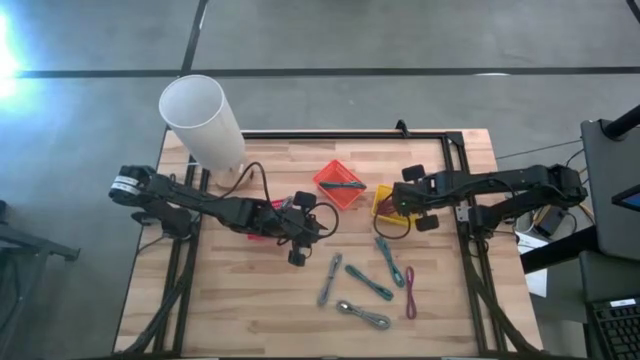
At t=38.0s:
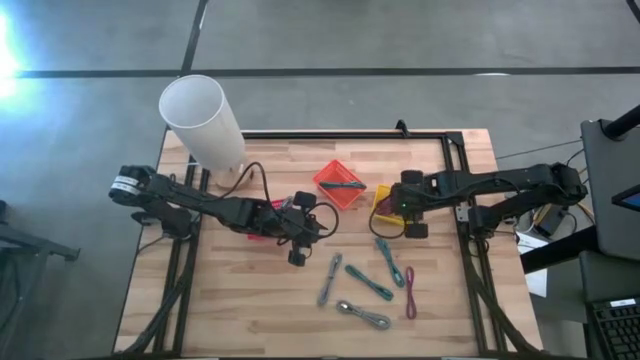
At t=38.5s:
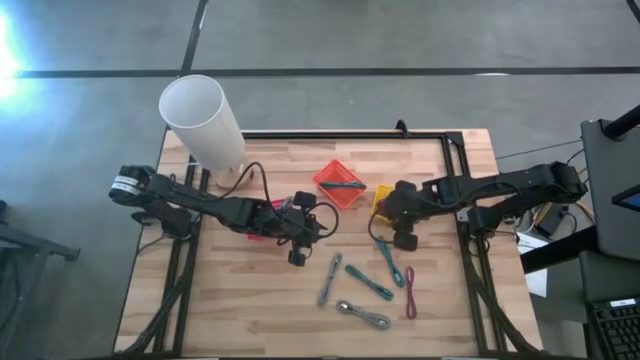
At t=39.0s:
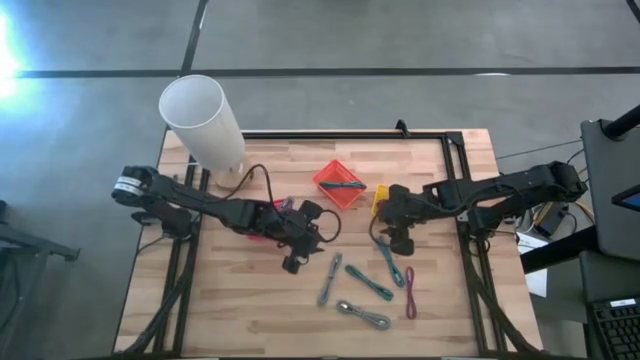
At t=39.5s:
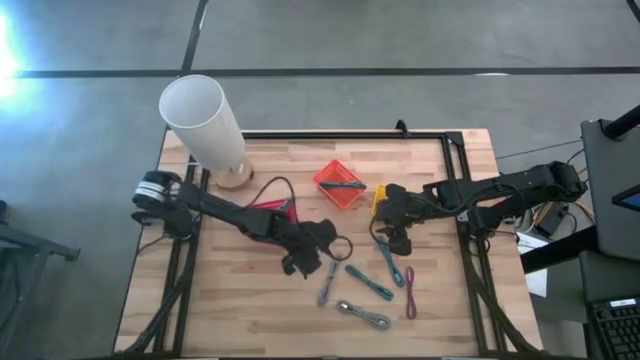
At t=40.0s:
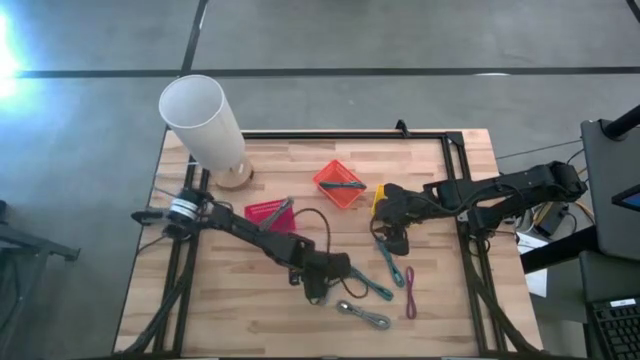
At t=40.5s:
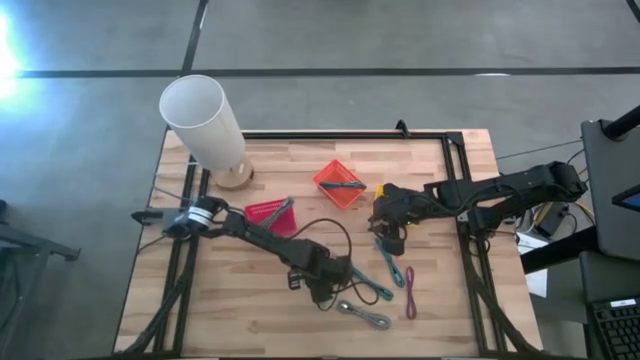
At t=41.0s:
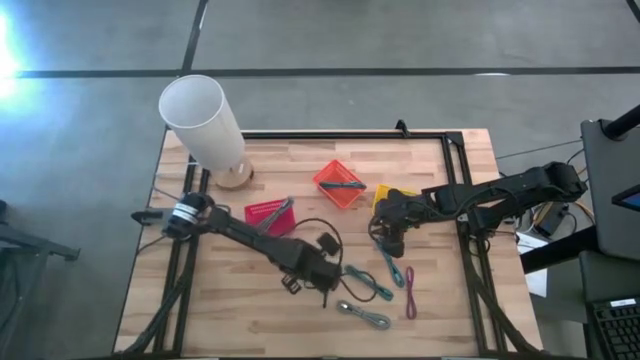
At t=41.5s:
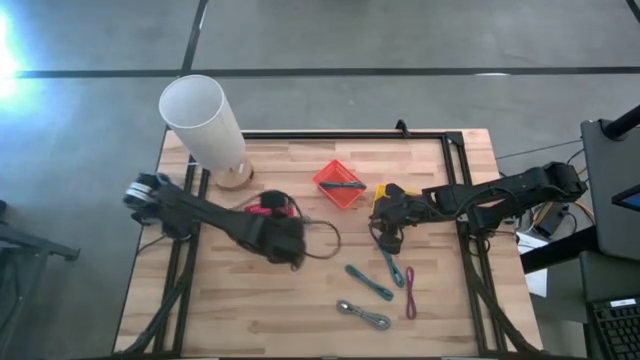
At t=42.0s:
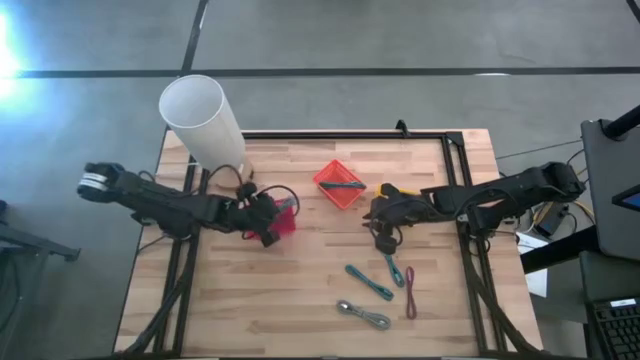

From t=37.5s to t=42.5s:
Task: Pick & Place USB Port
Put the top black and white charger cable into the red bin

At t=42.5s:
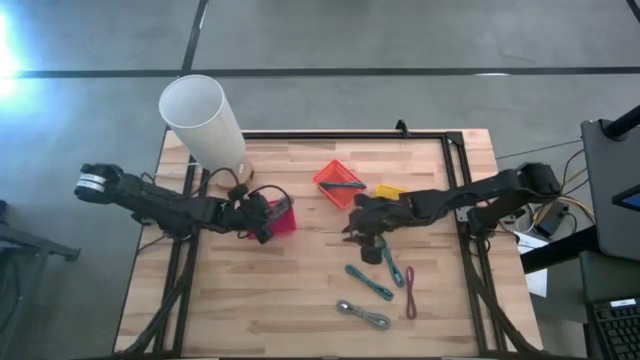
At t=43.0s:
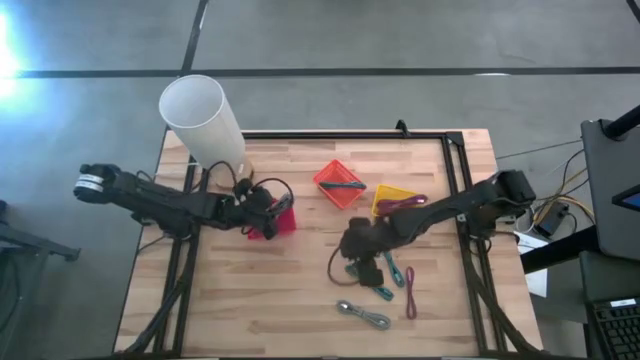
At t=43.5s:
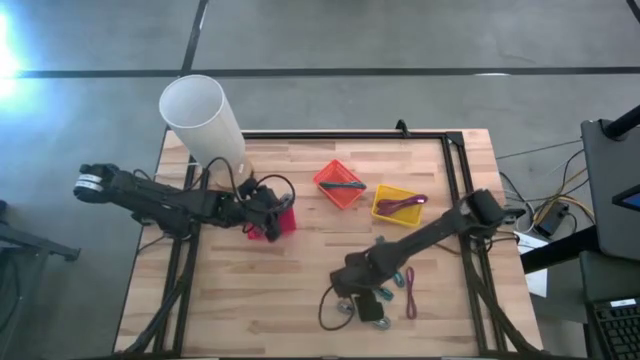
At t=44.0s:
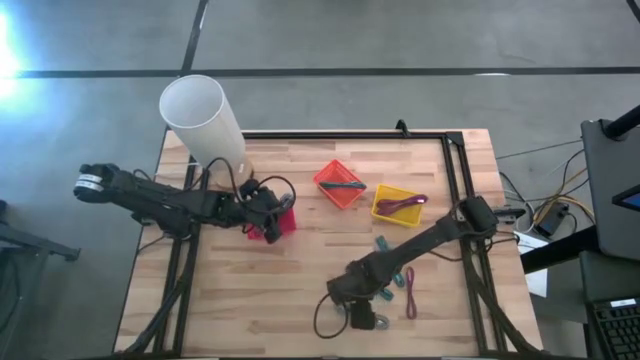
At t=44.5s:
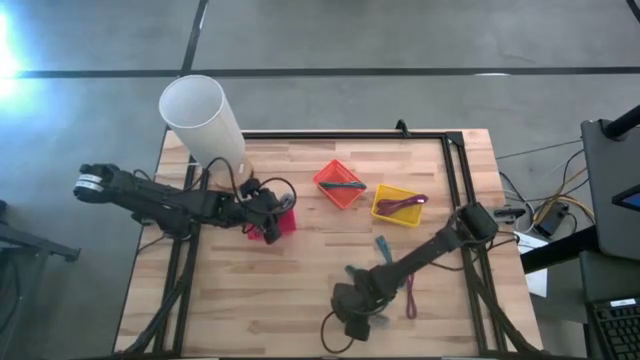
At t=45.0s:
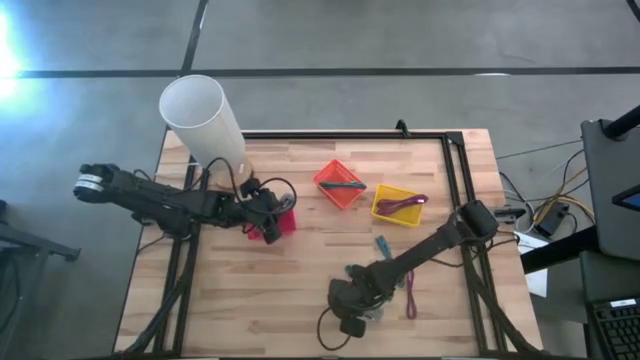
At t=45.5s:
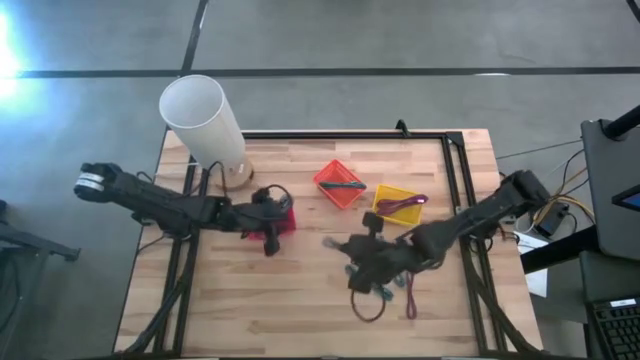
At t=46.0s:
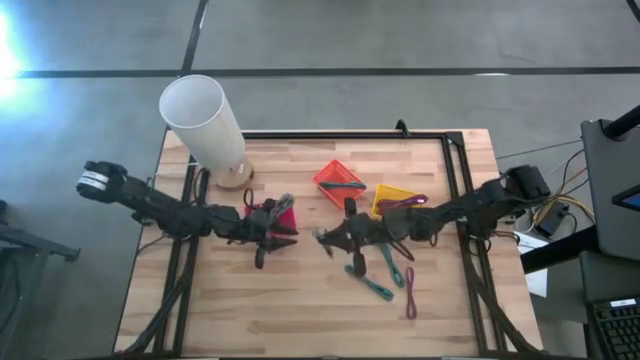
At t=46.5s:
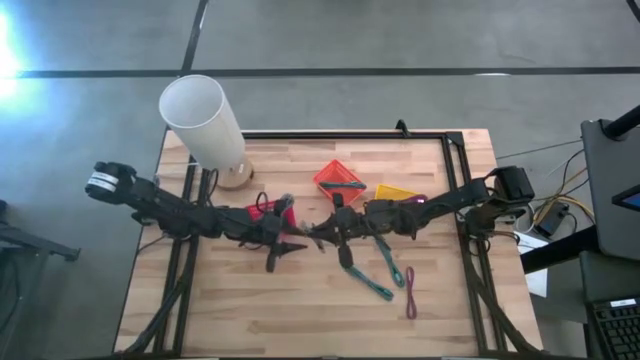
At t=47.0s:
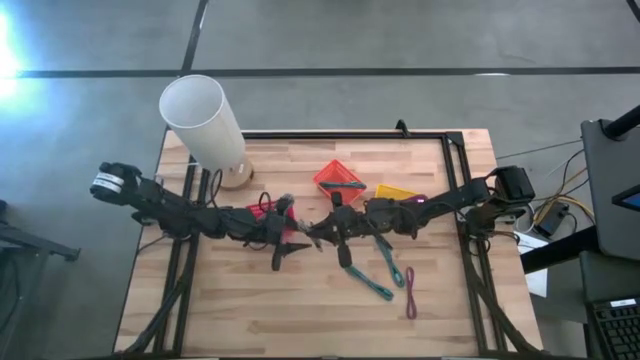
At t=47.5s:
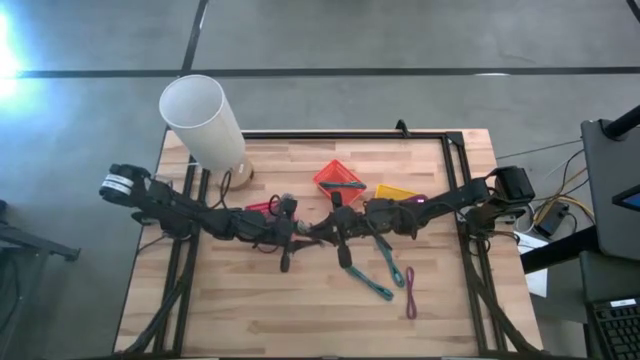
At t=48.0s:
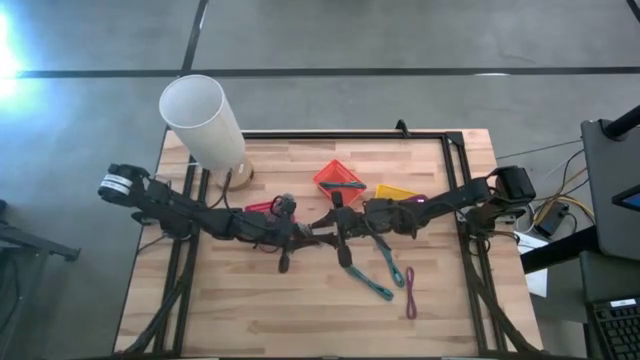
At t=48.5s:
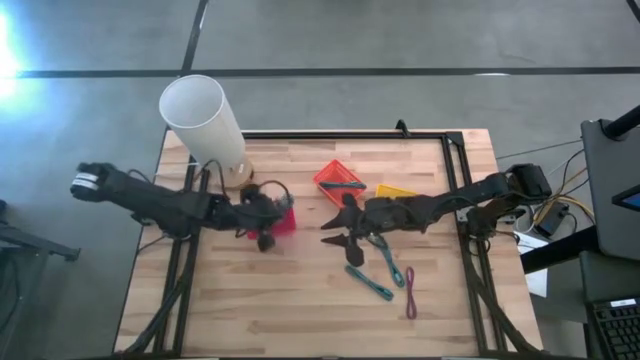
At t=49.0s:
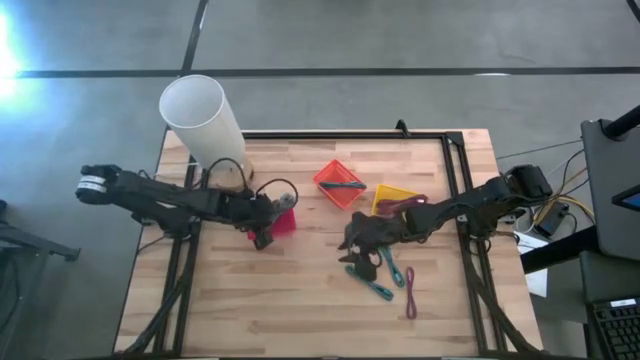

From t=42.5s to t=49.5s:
Put the black and white charger cable into the red bin

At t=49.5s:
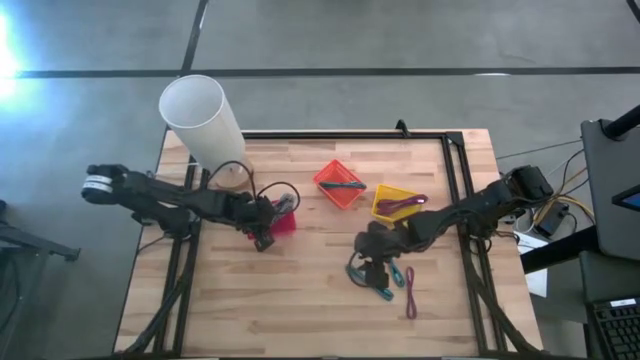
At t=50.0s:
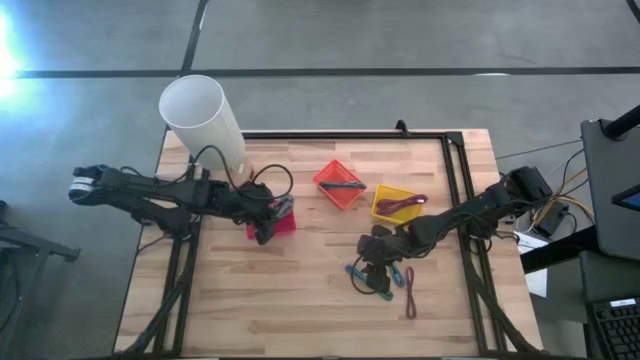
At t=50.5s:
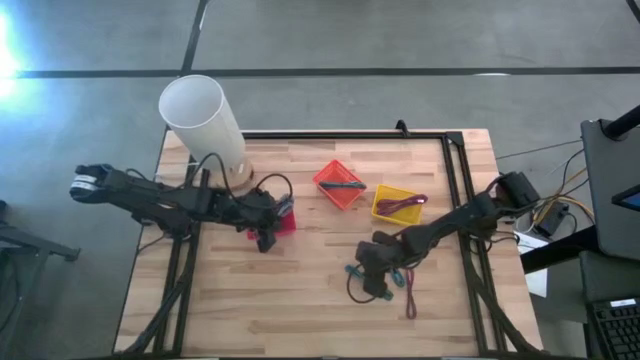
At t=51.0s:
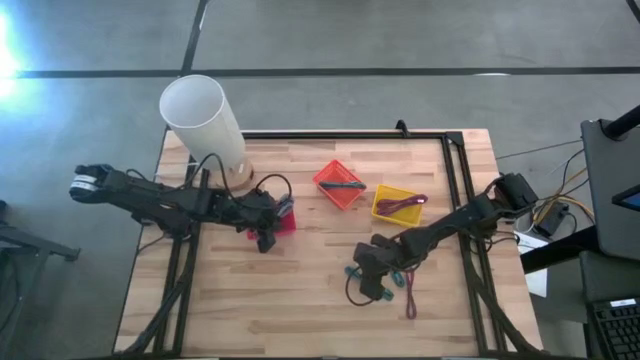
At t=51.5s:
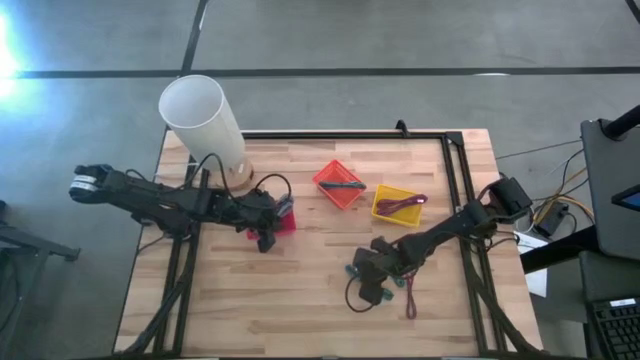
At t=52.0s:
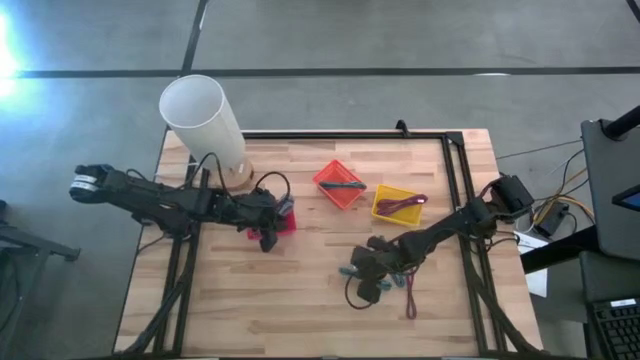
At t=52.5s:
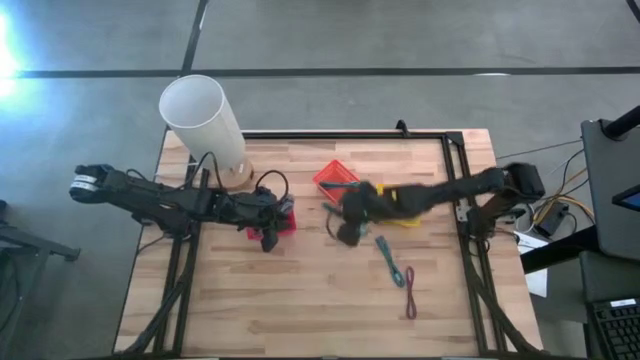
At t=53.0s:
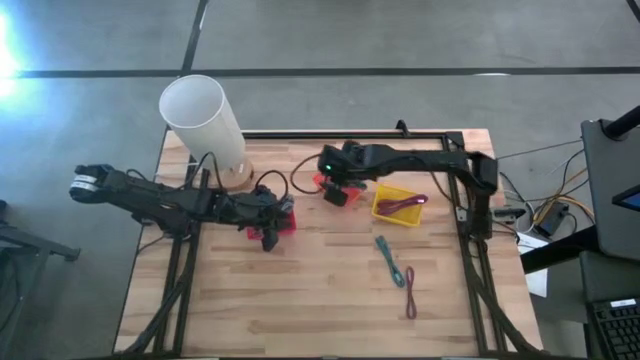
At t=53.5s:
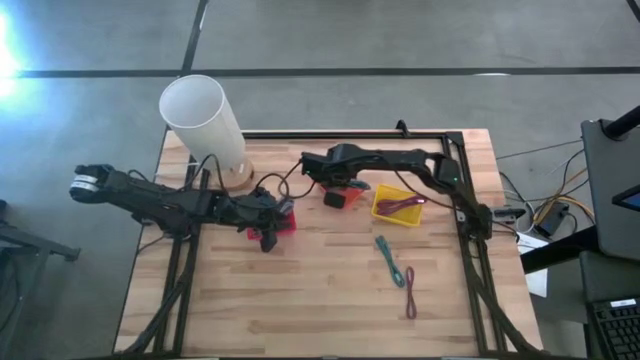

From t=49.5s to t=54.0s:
Put the bottom black and blue charger cable into the orange bin

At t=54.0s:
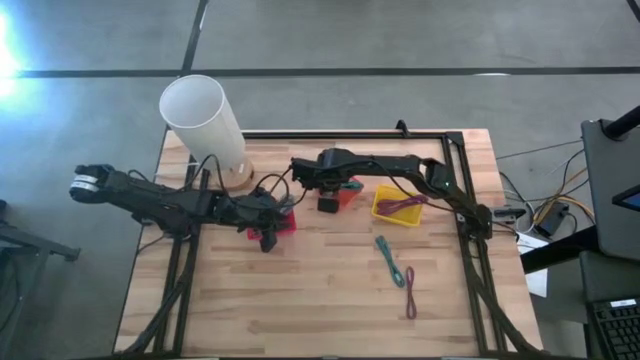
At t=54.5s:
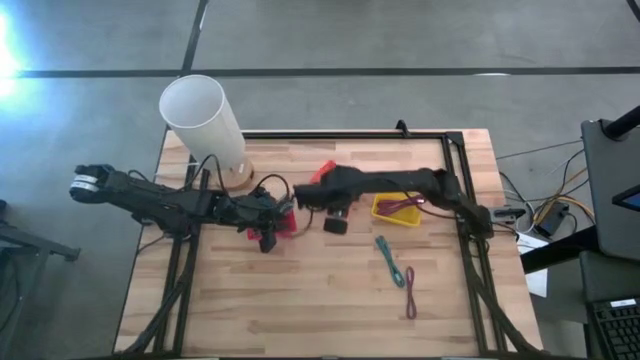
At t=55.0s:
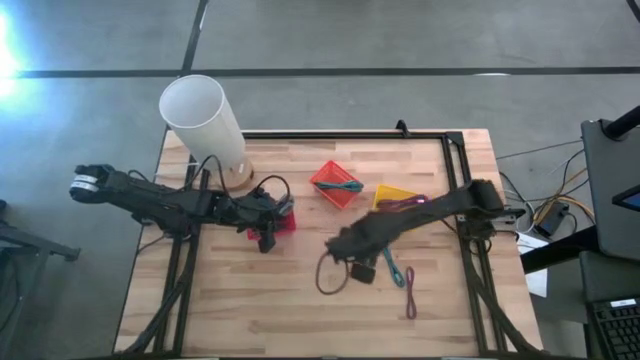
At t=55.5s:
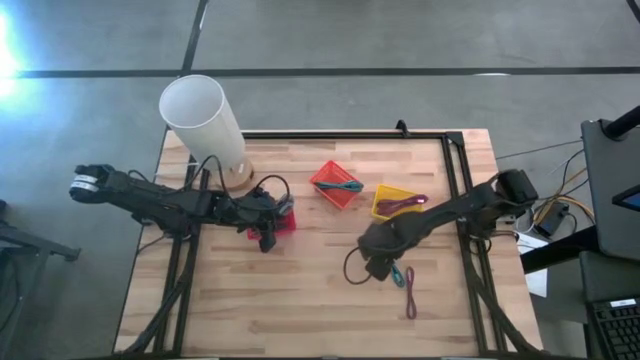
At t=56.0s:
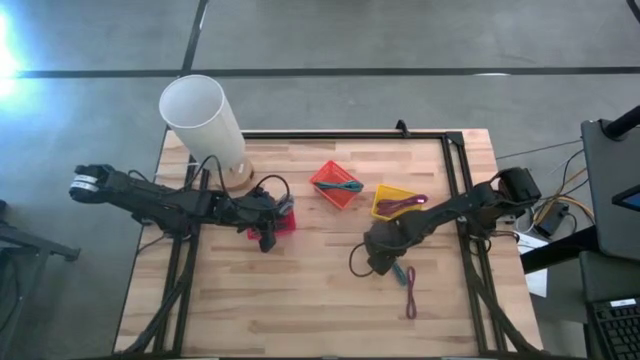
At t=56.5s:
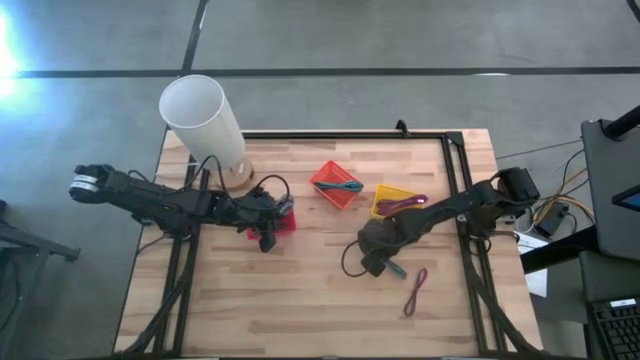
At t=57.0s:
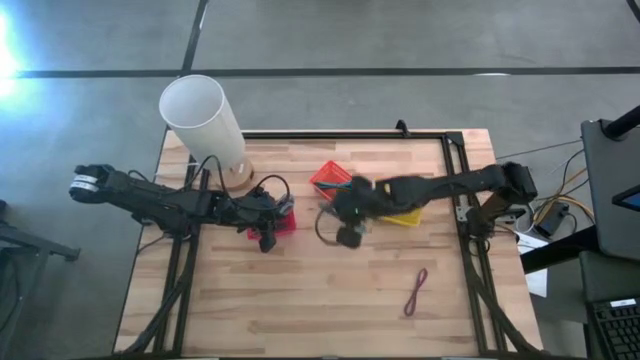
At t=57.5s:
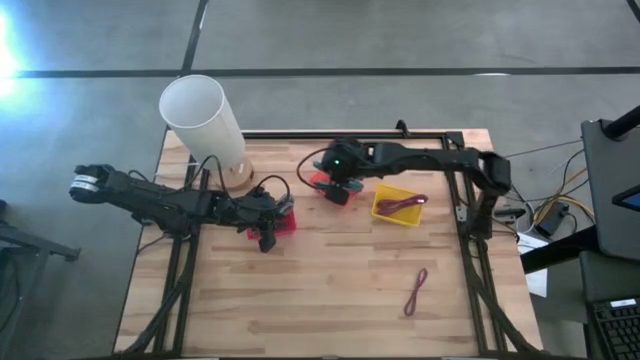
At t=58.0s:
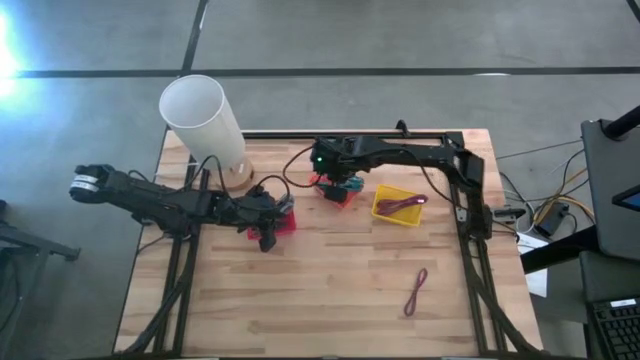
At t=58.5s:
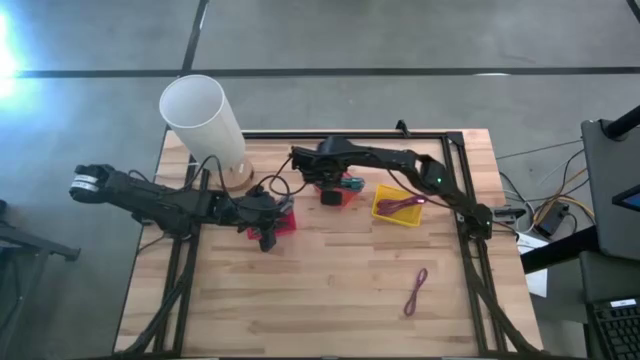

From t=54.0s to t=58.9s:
Put the black and blue charger cable into the orange bin
